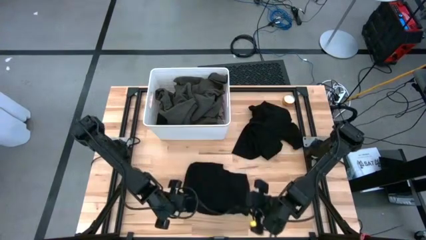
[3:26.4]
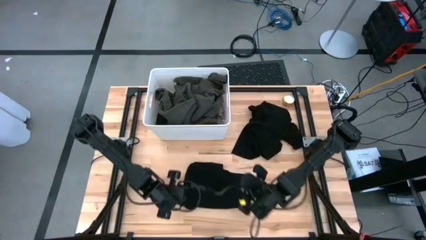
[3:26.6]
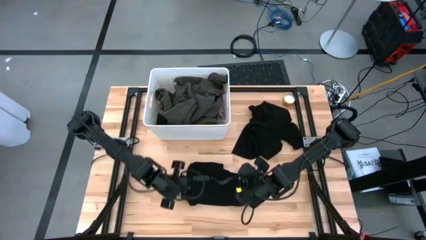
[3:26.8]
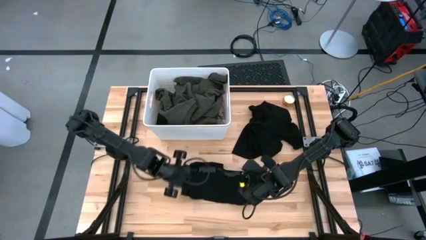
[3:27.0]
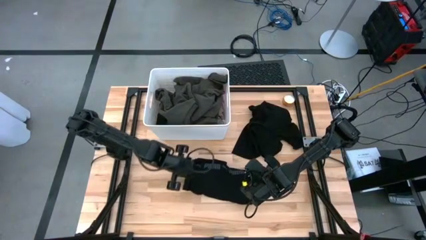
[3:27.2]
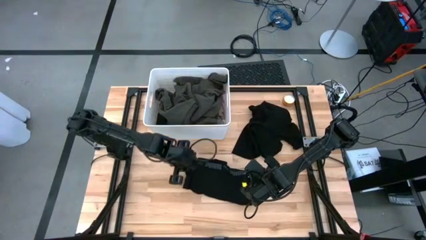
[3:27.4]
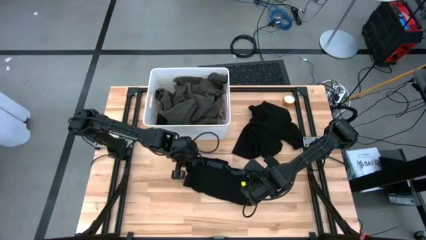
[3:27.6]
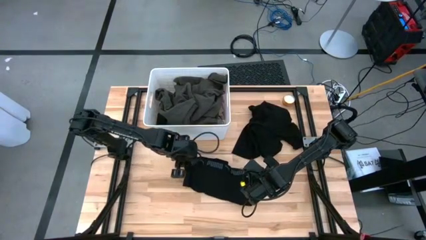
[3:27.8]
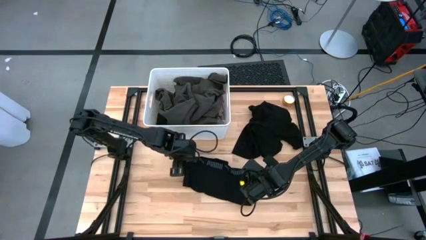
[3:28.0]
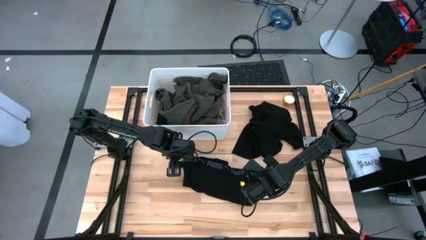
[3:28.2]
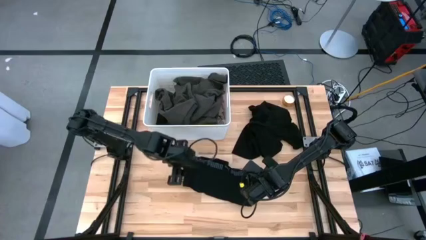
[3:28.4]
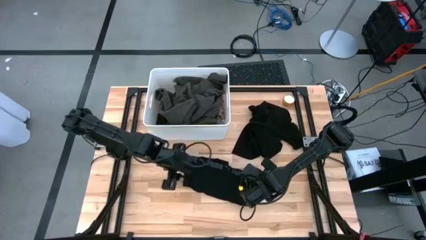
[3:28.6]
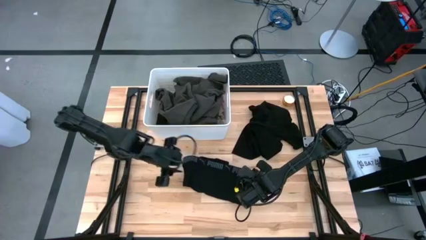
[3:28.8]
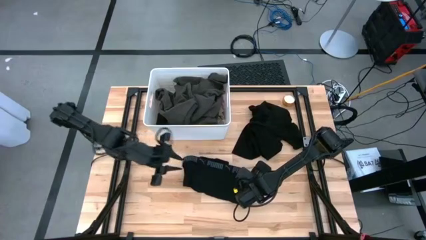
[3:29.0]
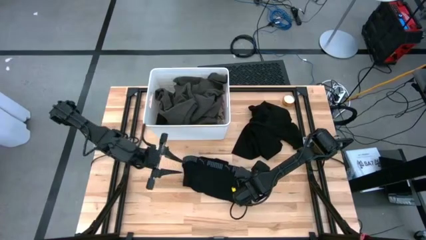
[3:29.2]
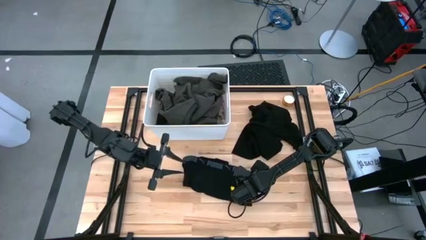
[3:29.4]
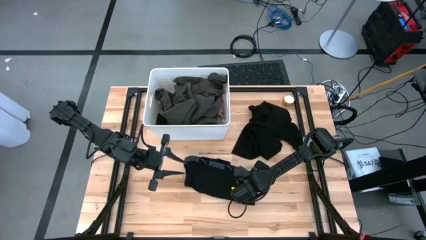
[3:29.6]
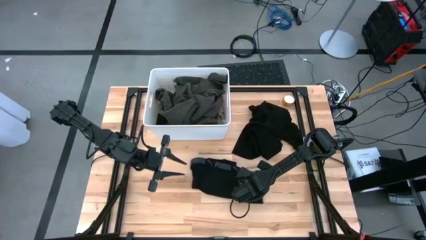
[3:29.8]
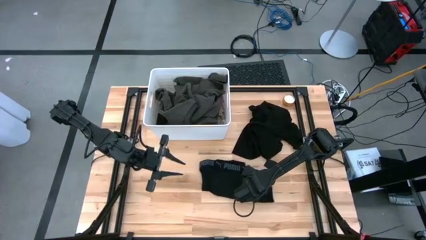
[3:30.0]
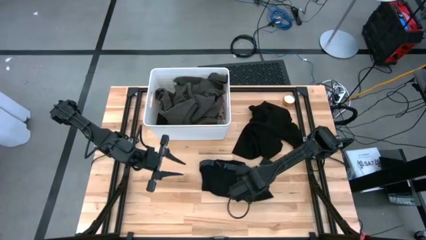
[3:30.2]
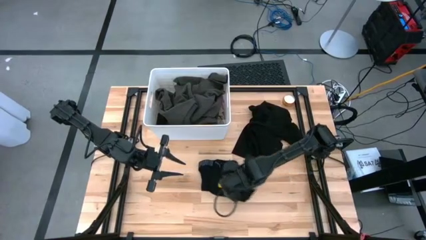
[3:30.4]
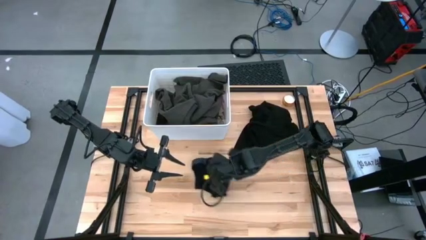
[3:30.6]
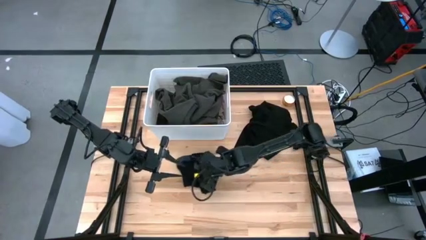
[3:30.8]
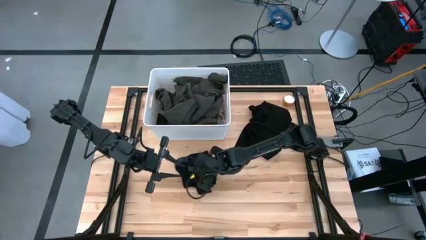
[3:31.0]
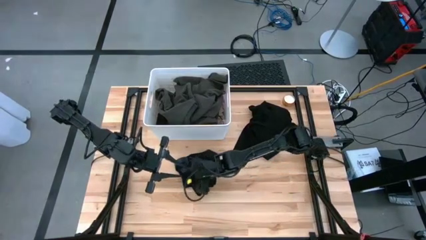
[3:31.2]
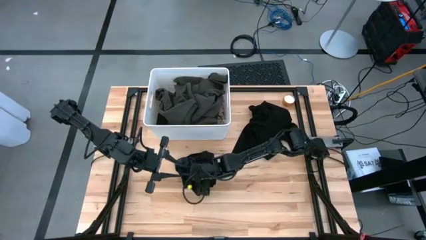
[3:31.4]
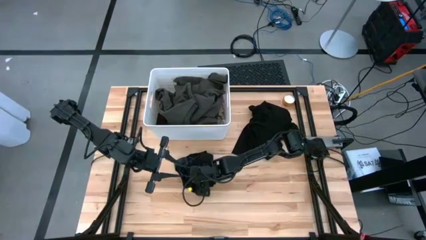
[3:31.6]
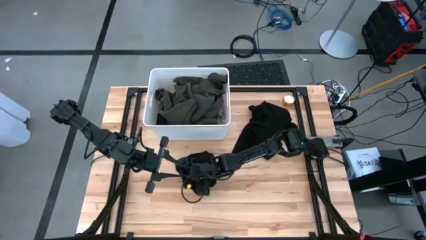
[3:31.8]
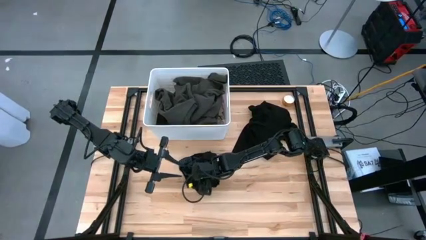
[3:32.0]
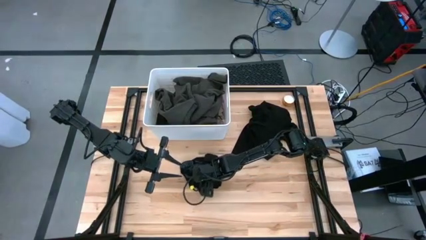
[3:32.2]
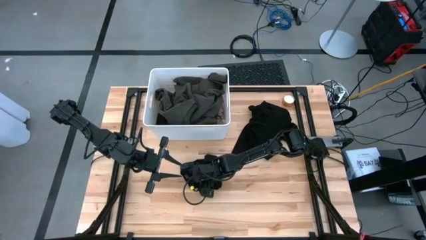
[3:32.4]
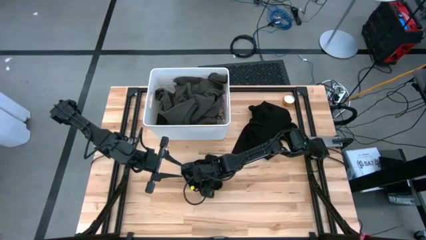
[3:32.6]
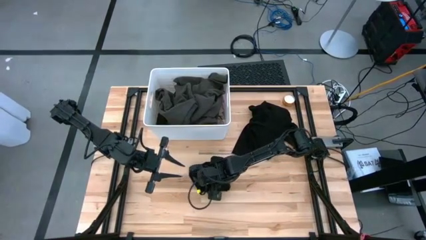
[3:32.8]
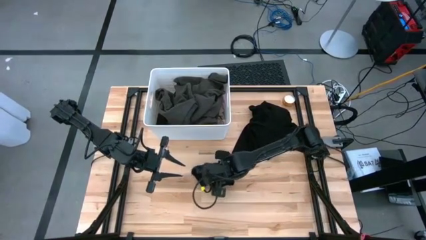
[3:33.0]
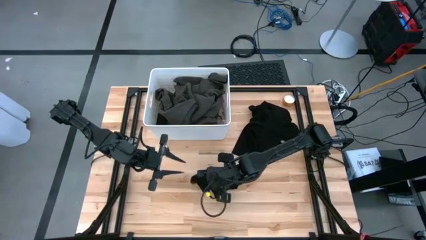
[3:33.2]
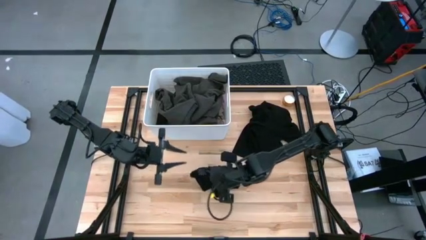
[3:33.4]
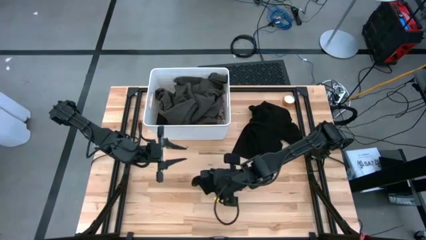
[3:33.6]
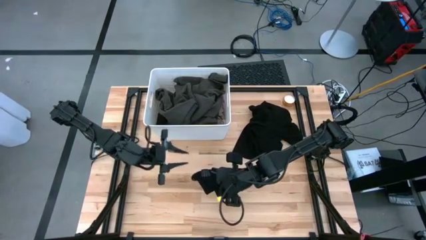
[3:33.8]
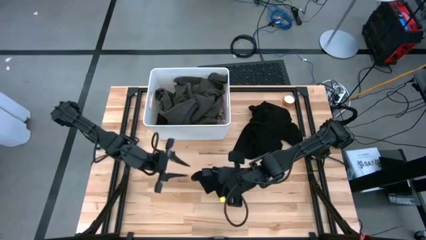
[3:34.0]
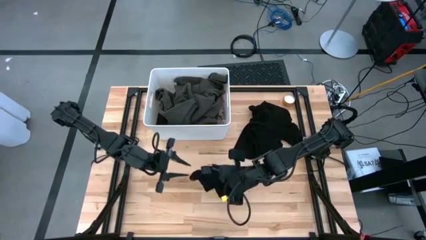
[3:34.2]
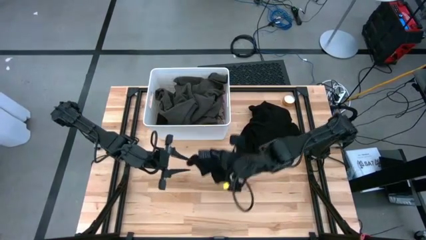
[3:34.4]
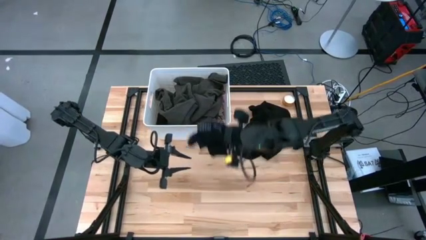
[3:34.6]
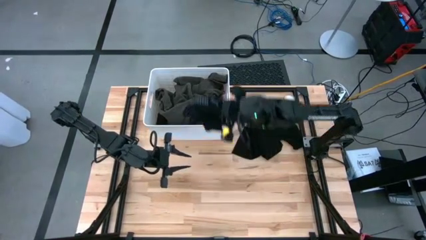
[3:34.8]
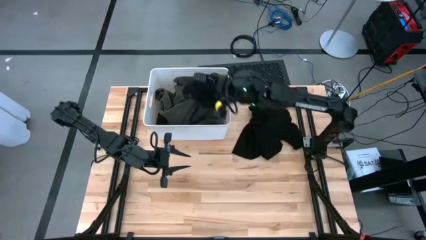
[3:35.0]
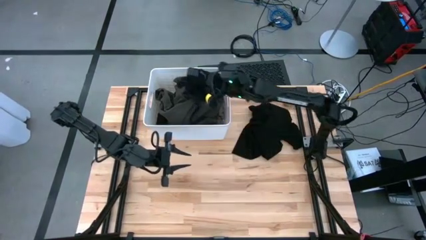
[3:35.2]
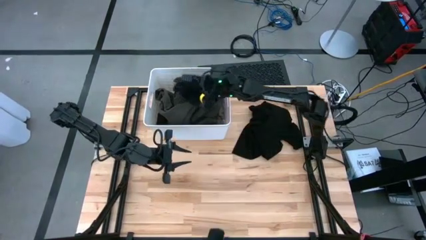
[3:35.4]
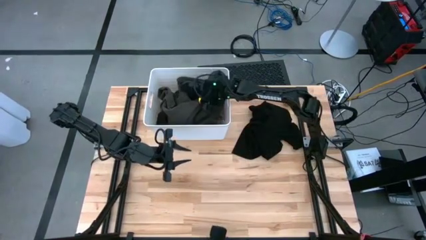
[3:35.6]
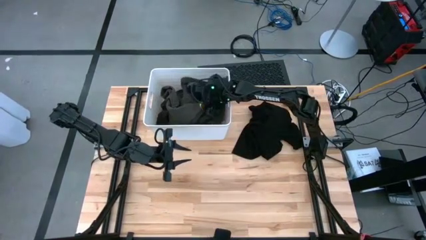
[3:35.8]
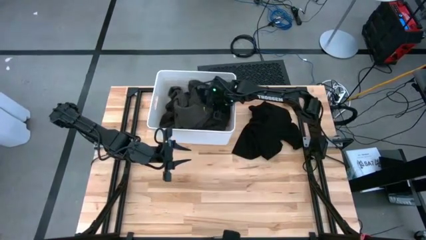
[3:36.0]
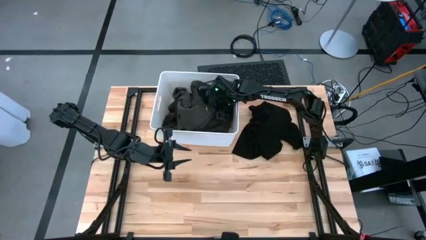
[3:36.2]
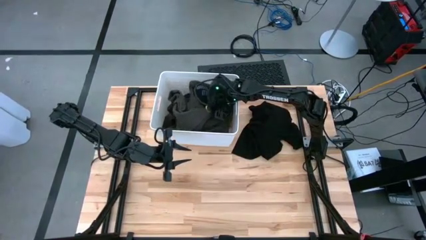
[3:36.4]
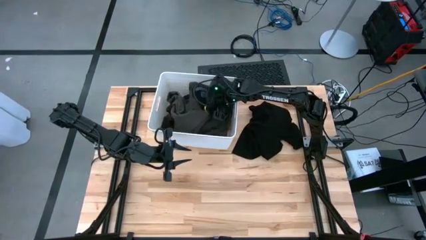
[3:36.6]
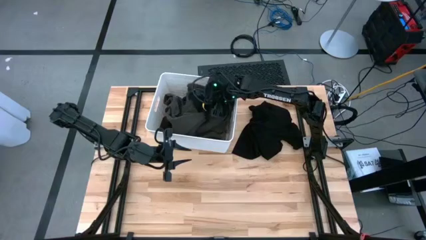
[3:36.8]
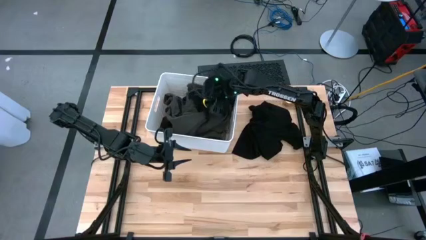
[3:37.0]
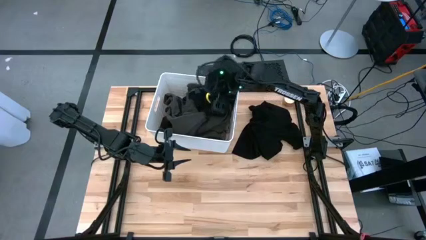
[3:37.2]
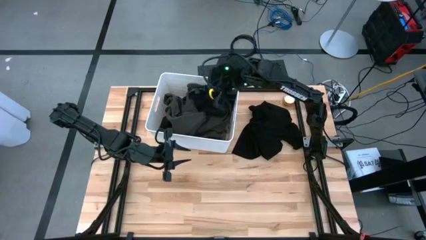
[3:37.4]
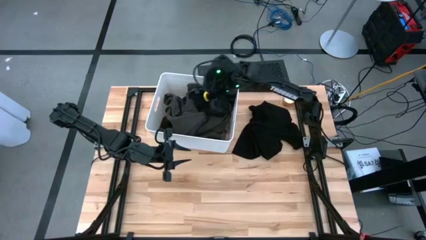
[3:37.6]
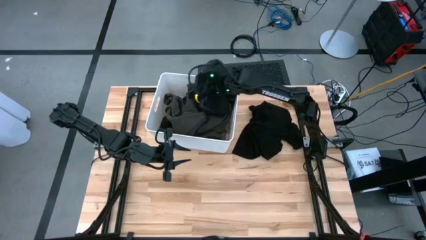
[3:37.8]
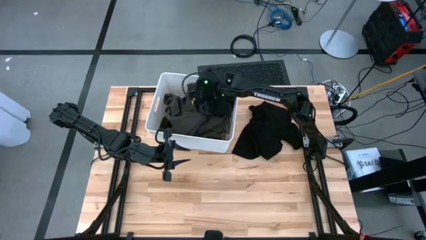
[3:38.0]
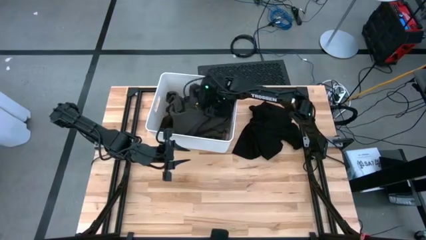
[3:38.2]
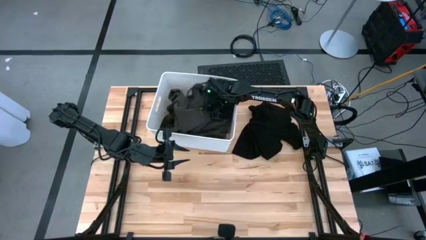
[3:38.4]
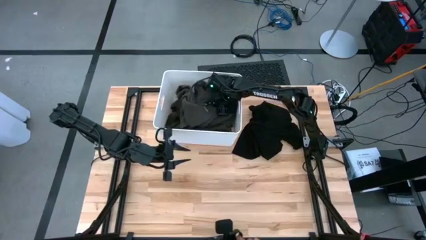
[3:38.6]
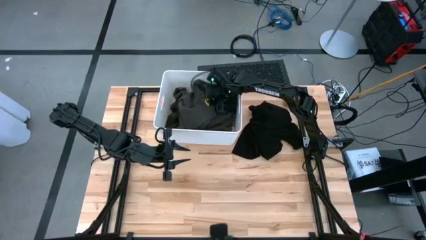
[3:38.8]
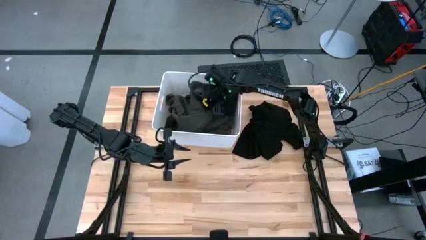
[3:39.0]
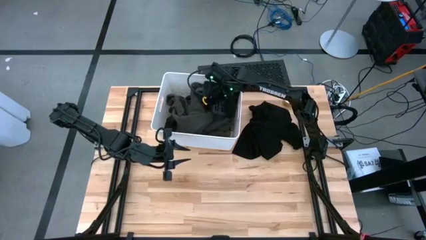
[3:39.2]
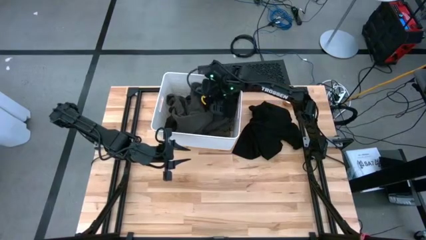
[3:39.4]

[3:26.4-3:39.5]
Task: Sort clothes
Put the black boxer into the white laundry bin

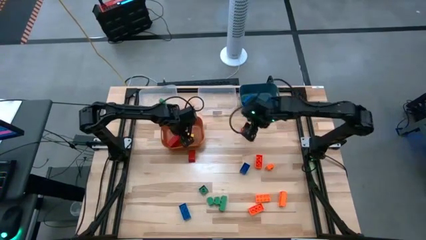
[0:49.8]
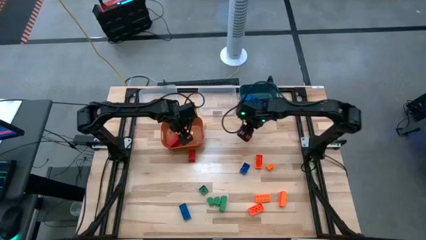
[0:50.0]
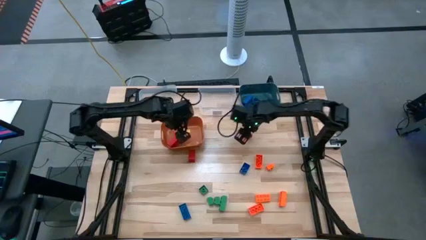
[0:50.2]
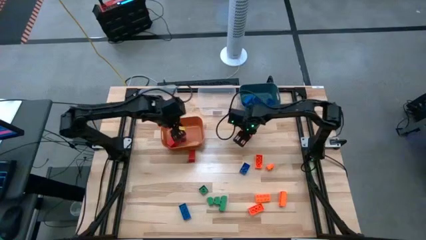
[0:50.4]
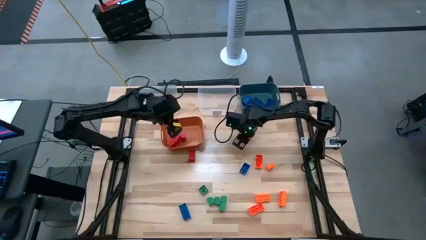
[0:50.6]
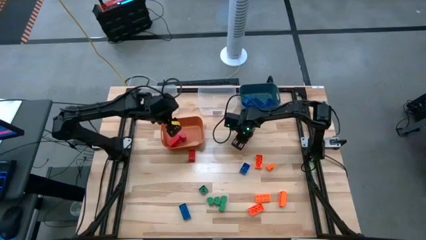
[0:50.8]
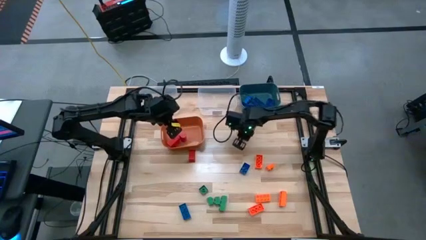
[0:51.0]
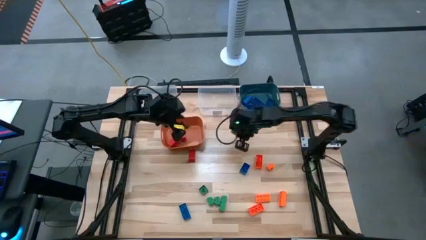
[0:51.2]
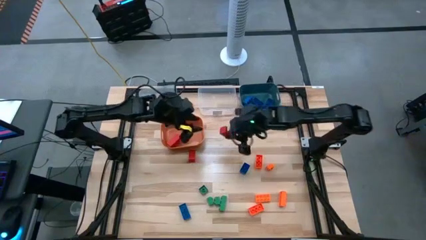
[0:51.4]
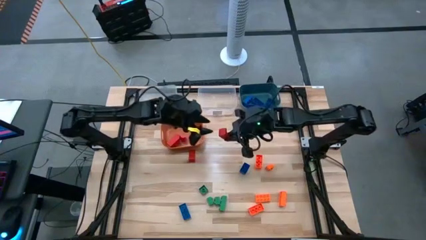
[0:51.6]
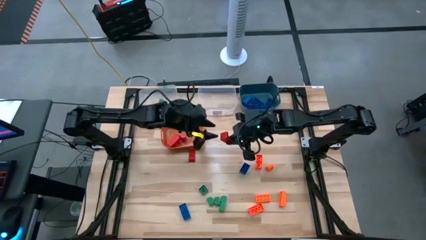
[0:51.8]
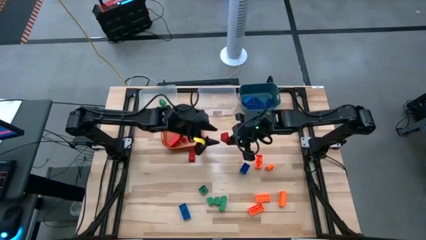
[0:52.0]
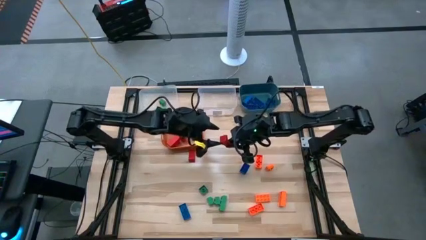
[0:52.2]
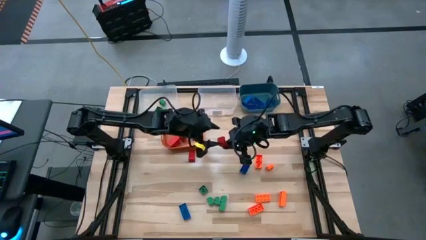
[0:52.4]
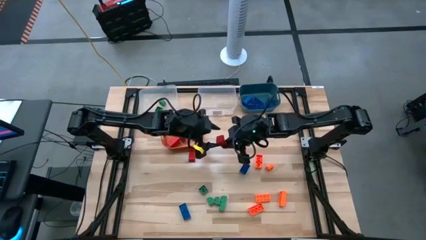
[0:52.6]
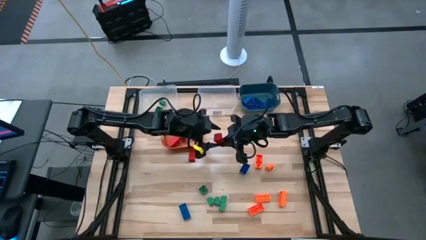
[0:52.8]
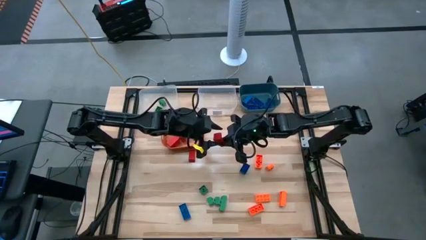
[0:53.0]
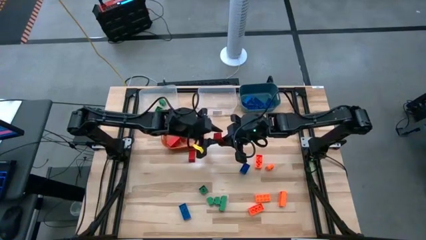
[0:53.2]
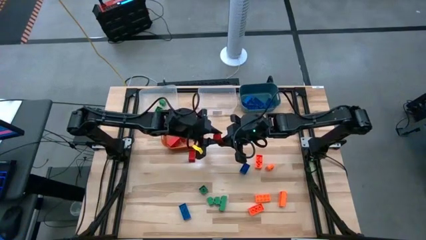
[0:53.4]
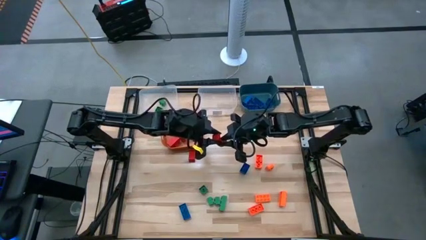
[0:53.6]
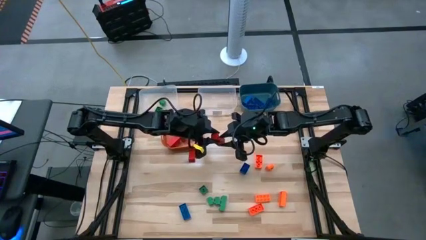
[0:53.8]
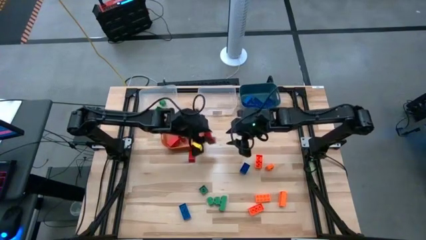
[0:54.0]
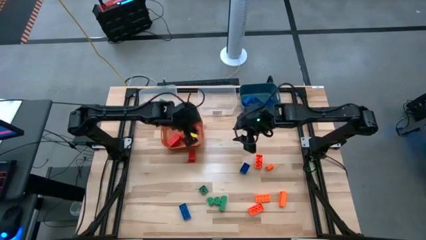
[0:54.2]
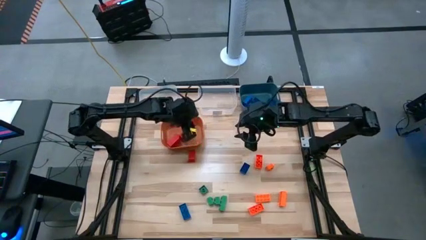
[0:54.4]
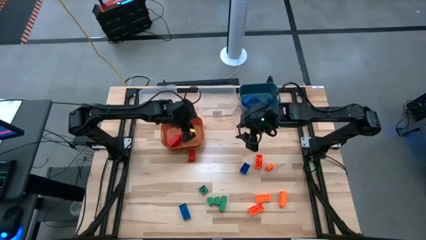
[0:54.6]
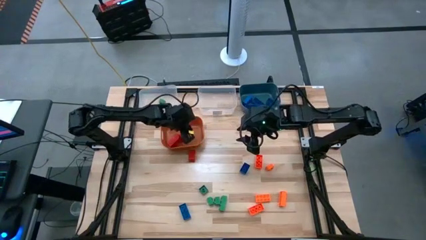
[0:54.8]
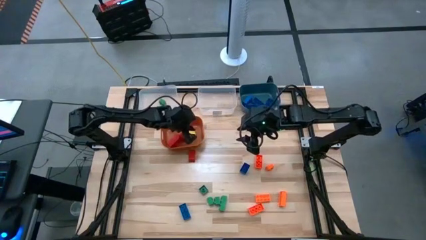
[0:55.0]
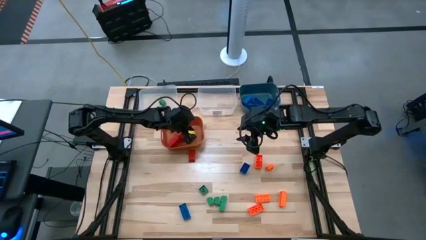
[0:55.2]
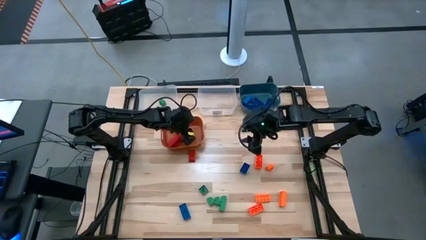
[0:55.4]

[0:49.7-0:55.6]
Task: Sort blocks
Put the red block into the orange bin
